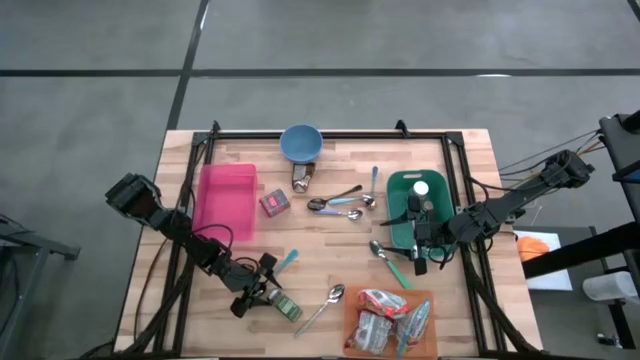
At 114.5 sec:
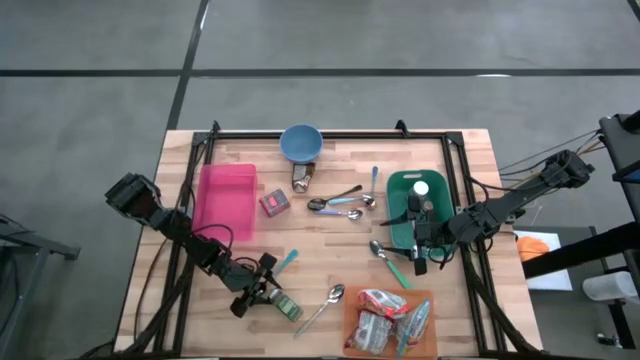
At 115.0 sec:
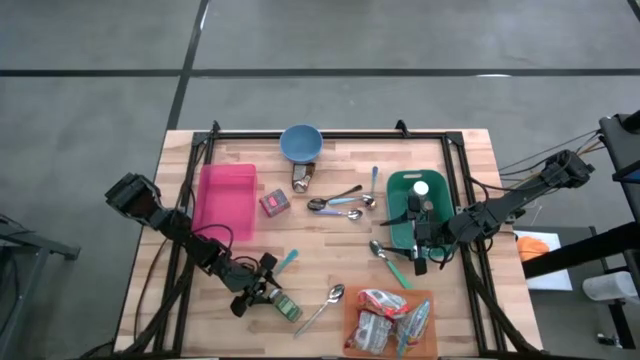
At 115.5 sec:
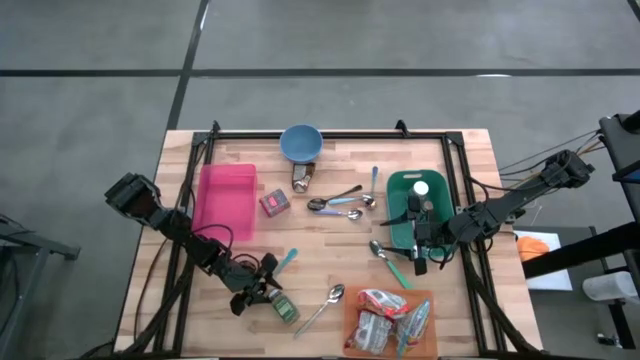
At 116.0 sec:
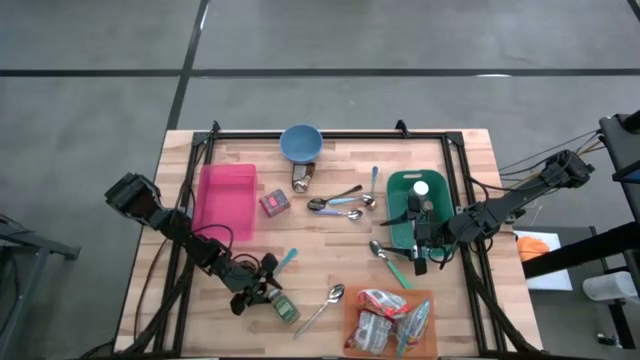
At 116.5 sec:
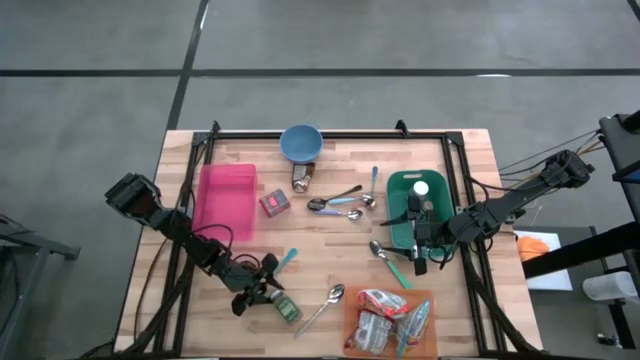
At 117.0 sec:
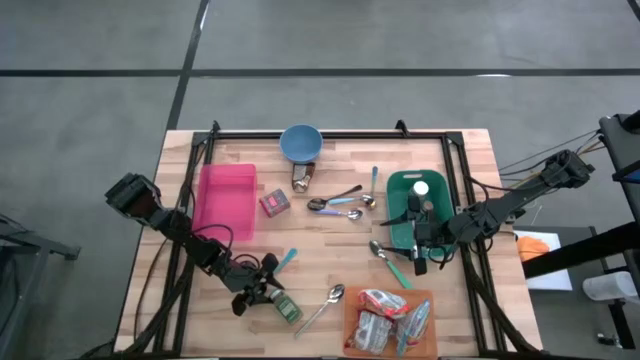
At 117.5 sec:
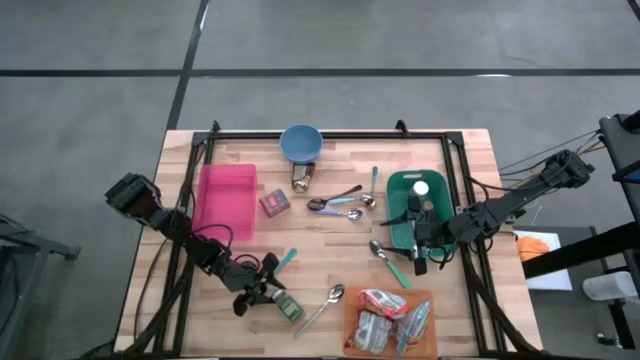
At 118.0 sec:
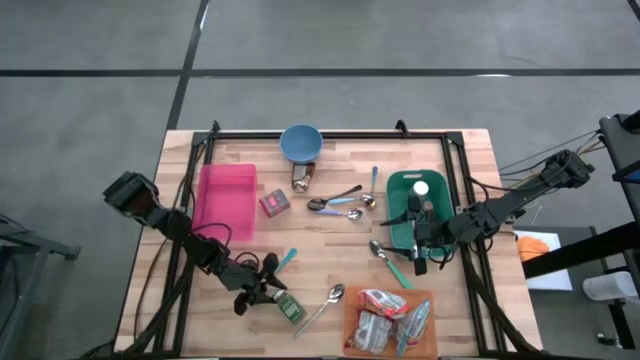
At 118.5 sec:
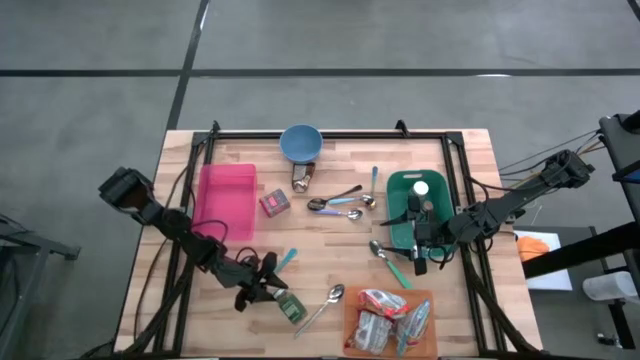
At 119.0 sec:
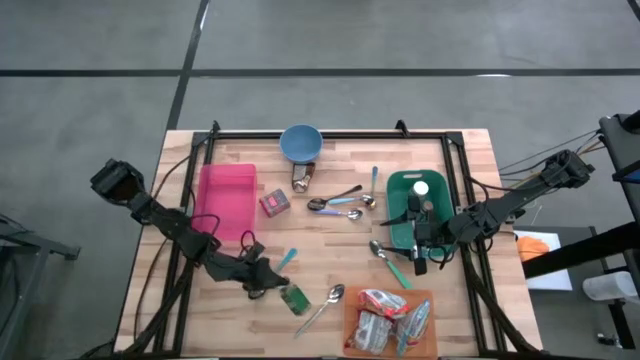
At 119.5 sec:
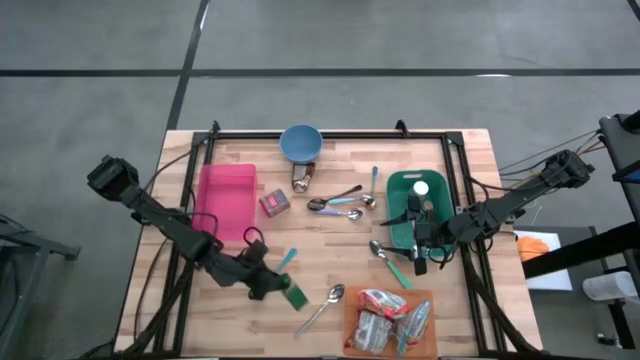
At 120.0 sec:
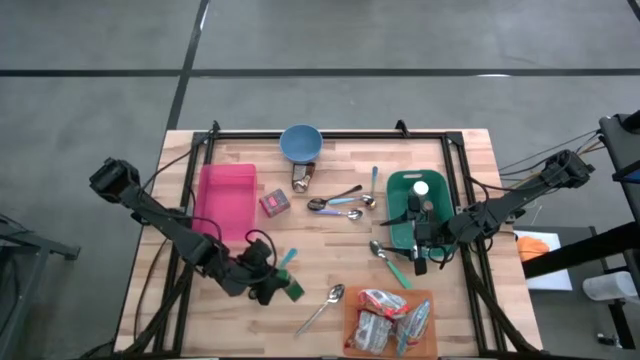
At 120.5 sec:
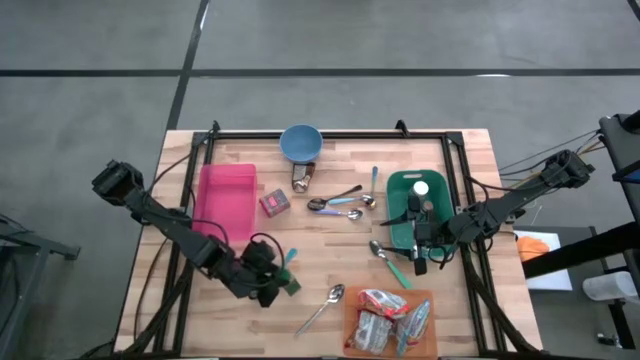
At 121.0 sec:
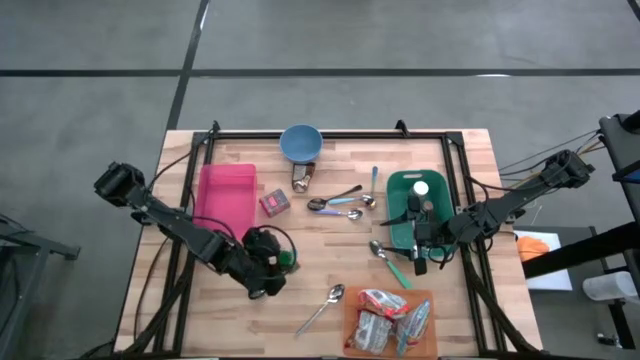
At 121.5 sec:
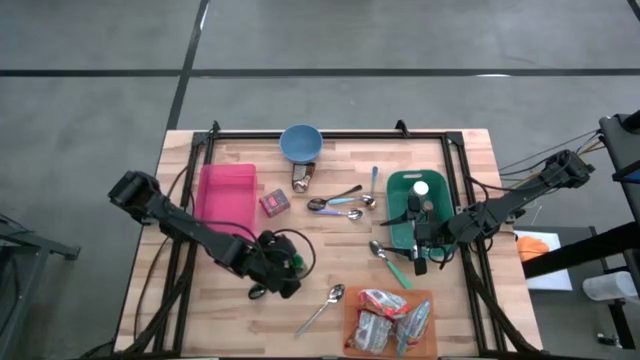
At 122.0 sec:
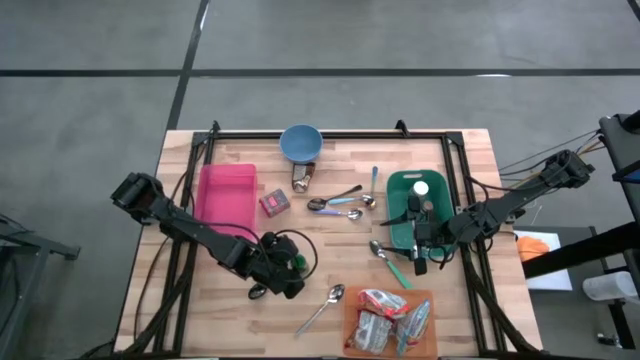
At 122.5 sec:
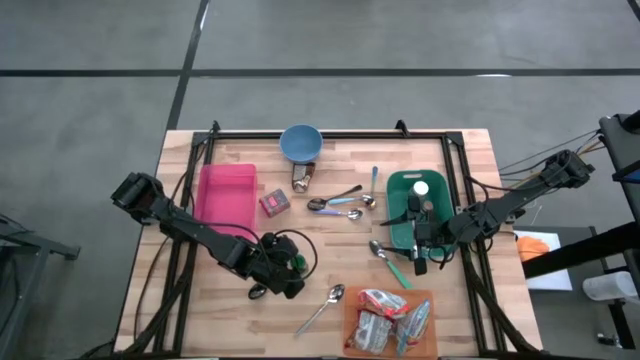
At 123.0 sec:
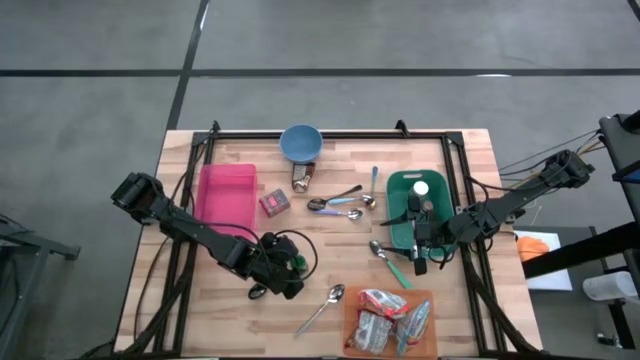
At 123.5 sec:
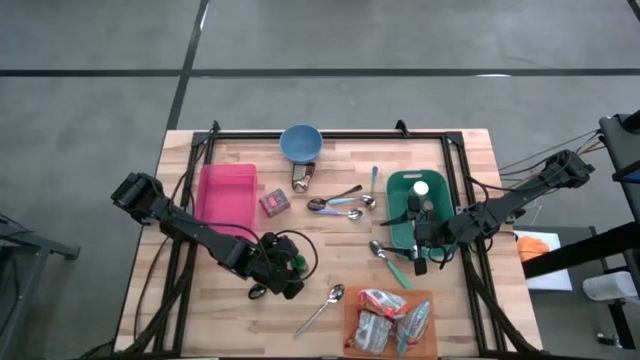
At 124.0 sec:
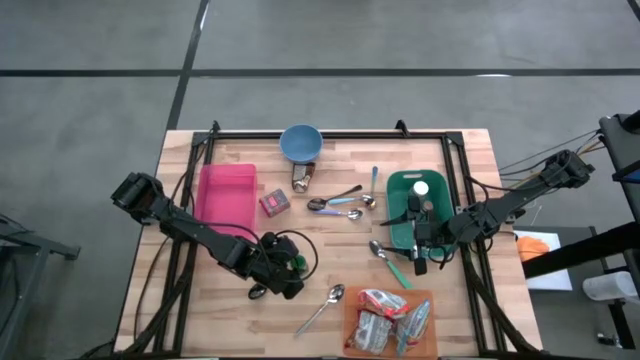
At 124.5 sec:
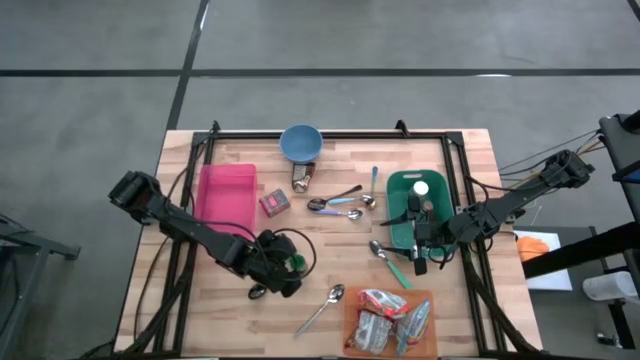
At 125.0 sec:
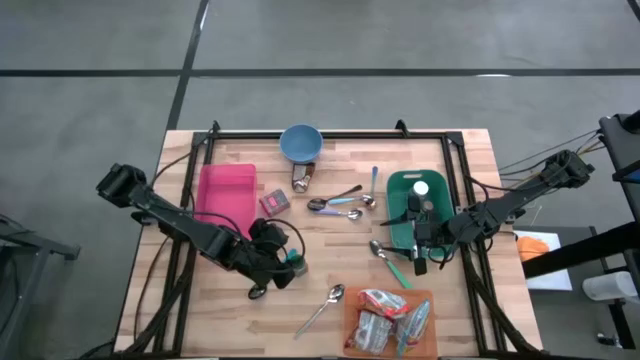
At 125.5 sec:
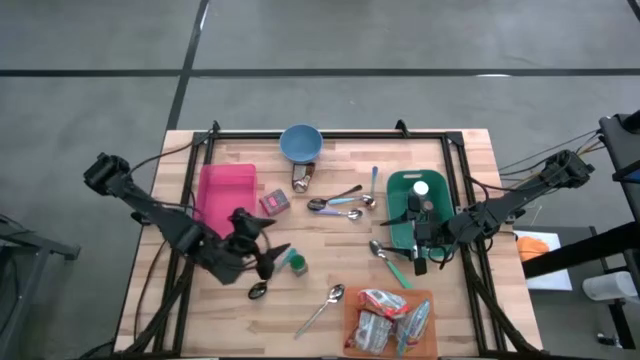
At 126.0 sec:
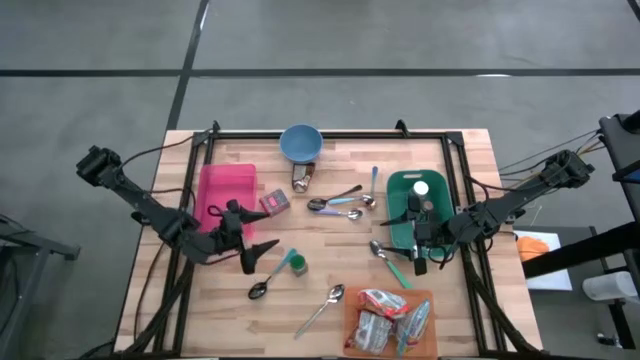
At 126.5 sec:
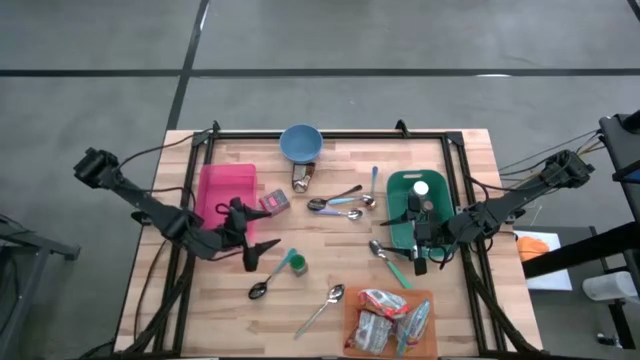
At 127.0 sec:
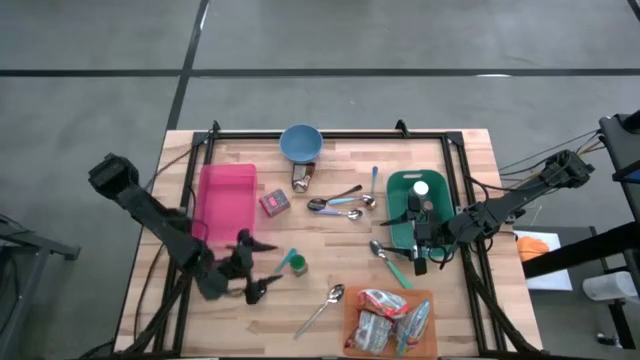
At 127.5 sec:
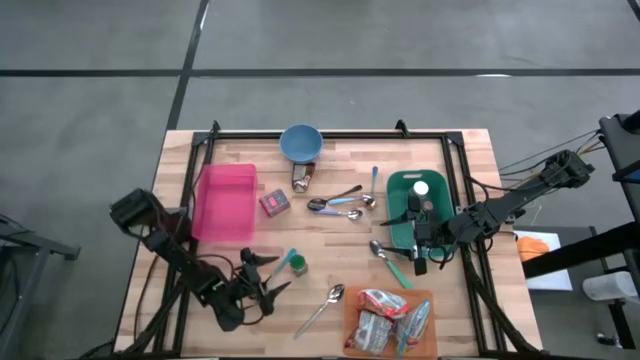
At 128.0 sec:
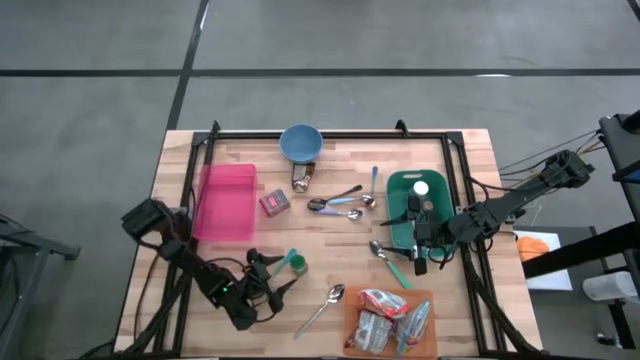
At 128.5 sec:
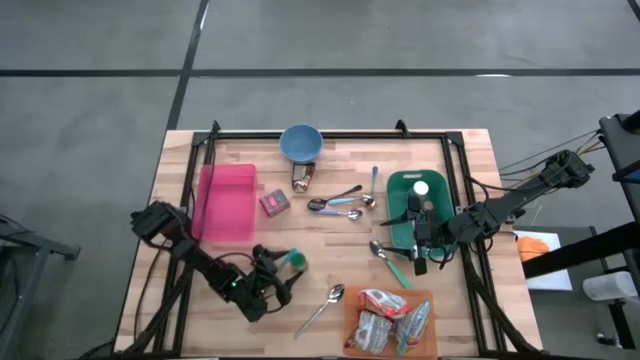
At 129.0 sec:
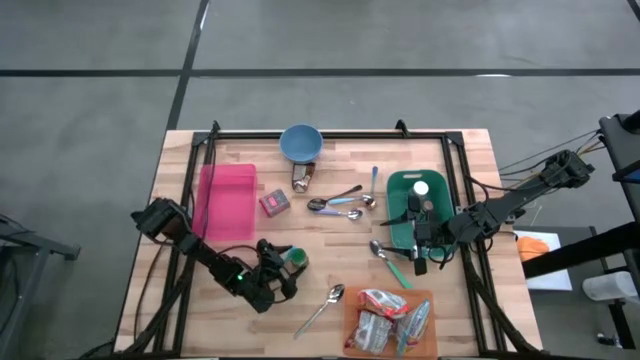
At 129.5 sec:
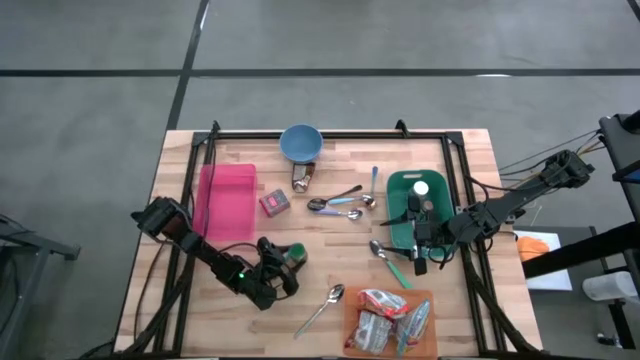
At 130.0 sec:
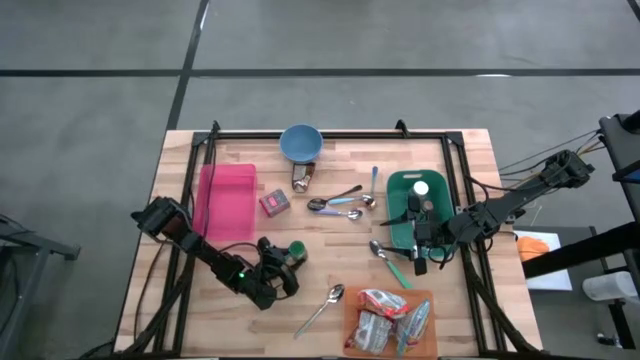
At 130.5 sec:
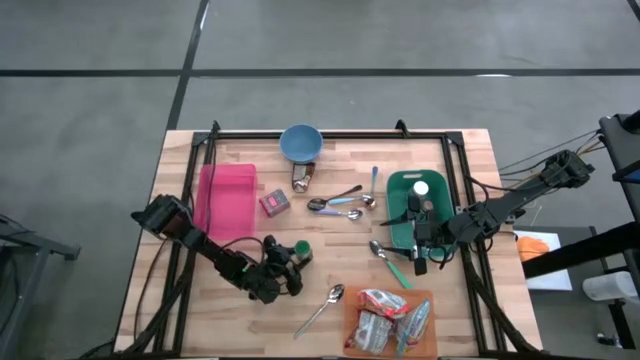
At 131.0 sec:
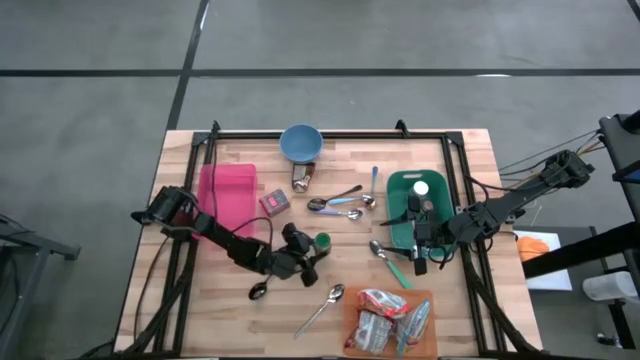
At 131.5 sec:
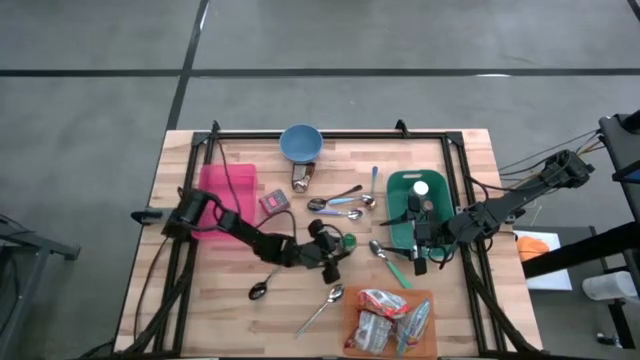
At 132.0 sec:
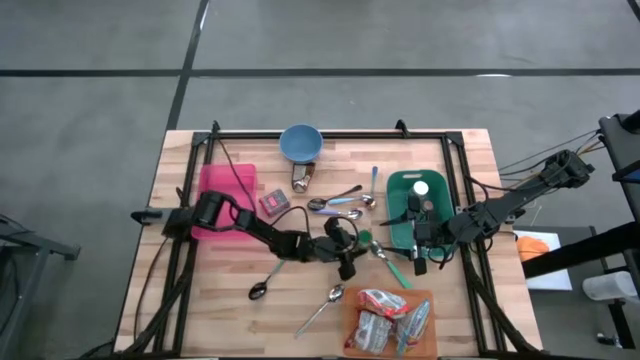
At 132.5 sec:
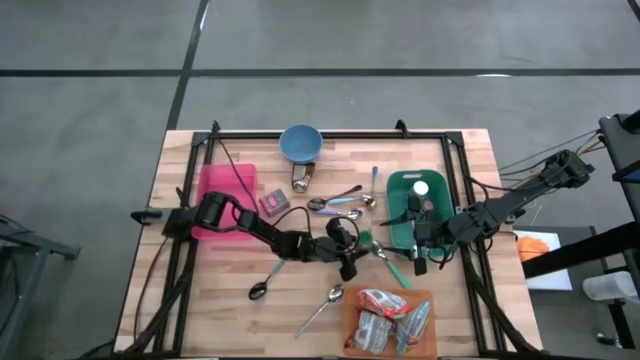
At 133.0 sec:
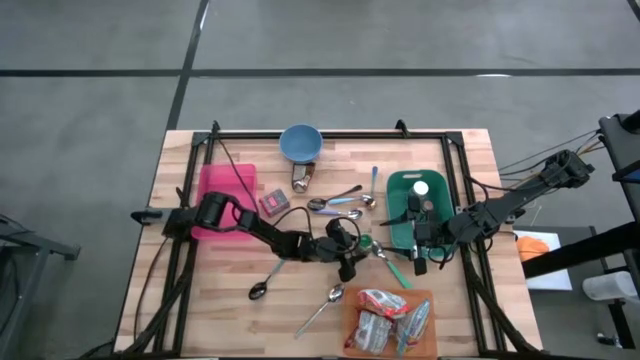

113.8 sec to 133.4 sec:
Put the green seasoning bottle into the green bin
